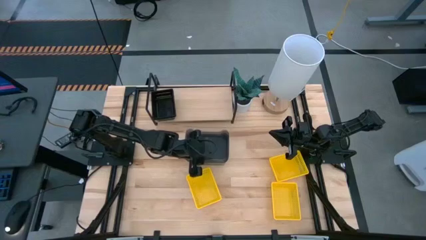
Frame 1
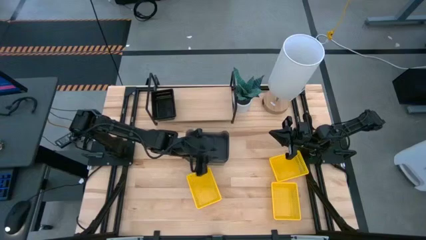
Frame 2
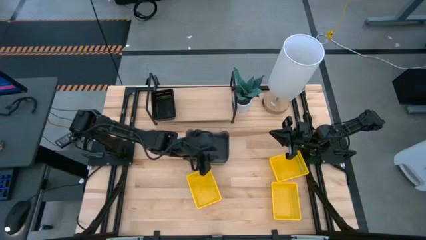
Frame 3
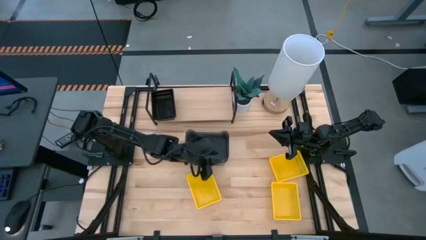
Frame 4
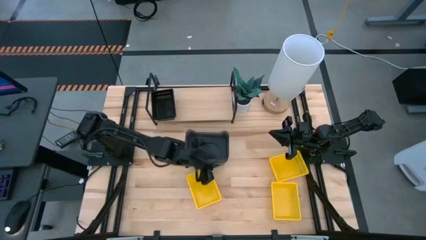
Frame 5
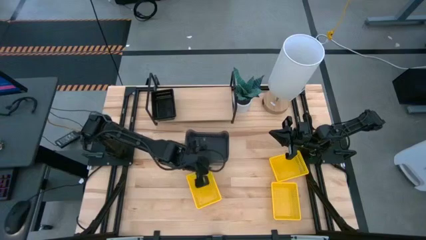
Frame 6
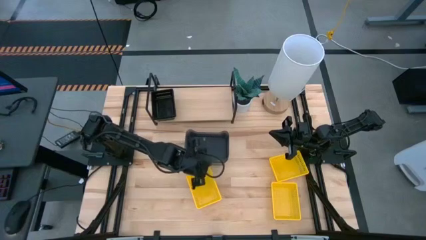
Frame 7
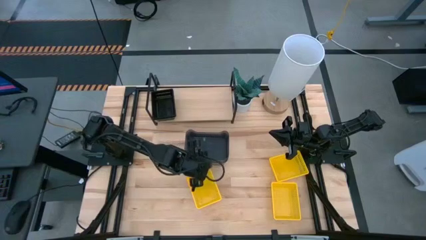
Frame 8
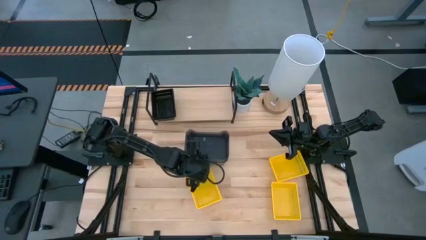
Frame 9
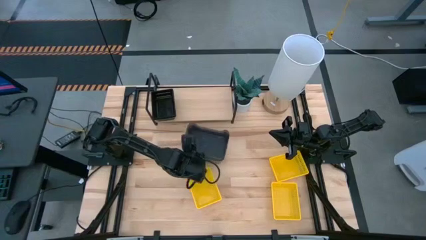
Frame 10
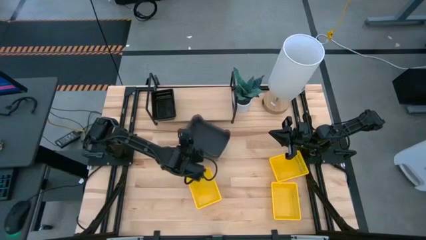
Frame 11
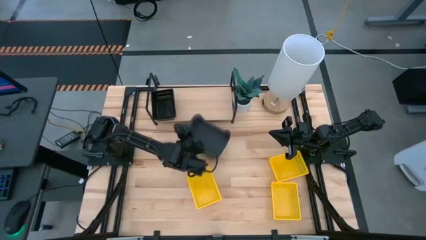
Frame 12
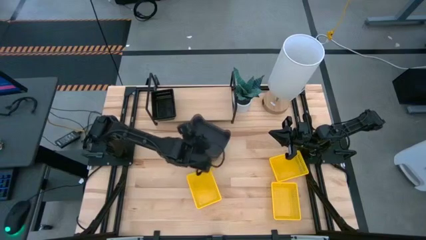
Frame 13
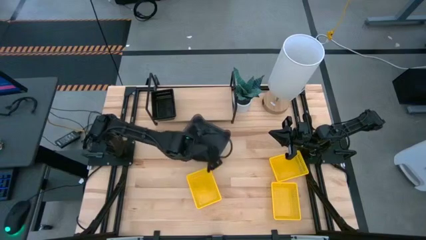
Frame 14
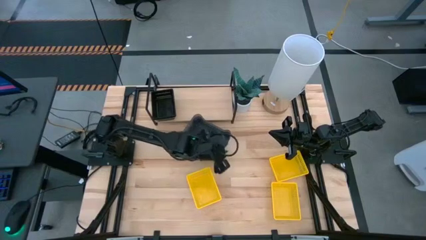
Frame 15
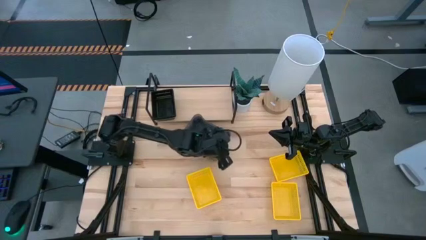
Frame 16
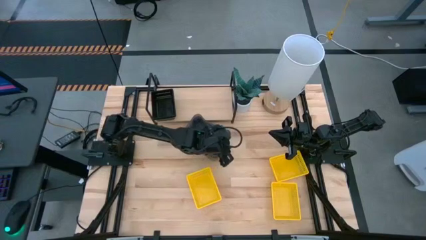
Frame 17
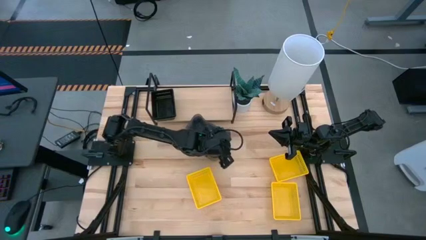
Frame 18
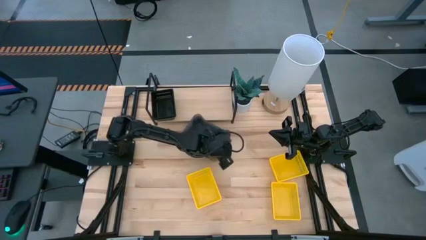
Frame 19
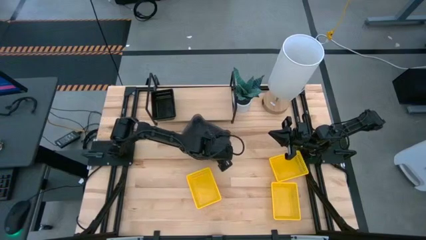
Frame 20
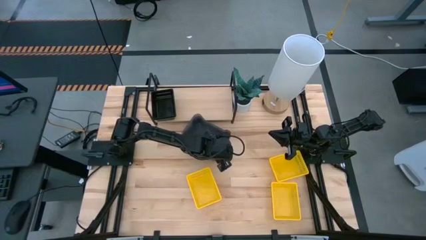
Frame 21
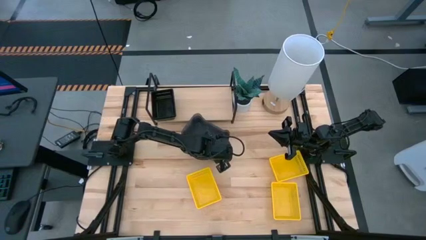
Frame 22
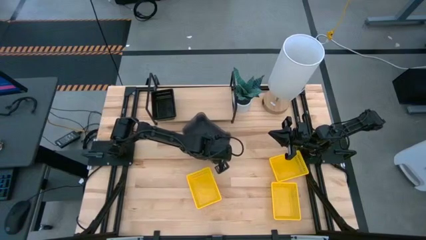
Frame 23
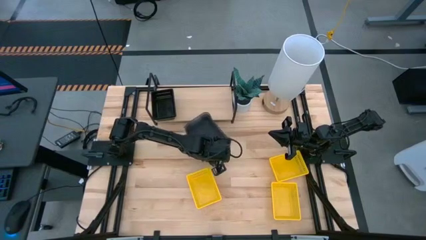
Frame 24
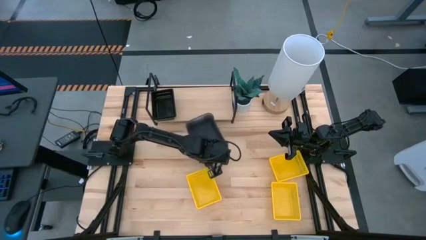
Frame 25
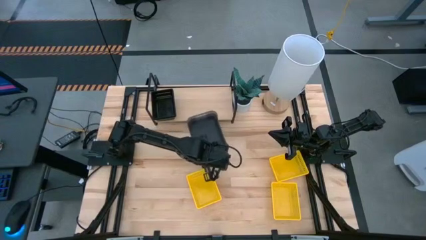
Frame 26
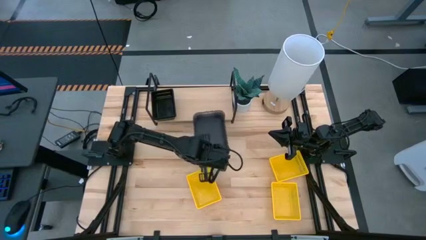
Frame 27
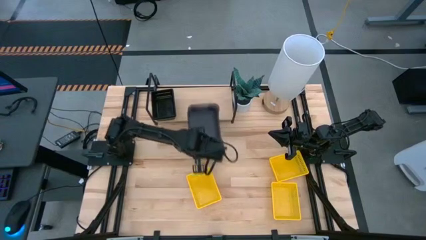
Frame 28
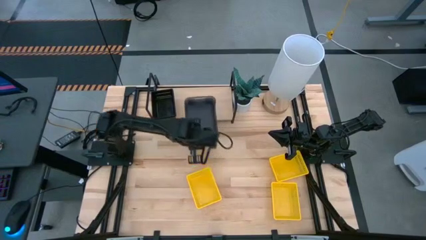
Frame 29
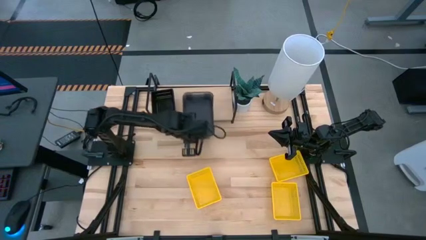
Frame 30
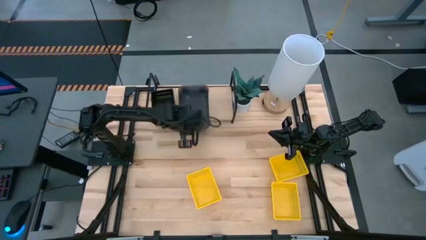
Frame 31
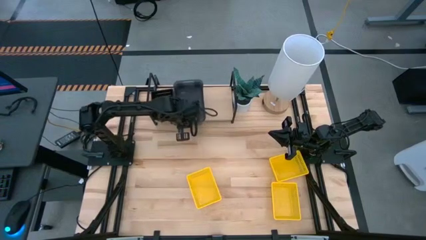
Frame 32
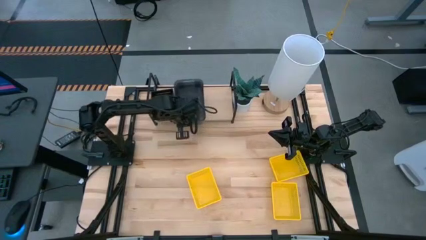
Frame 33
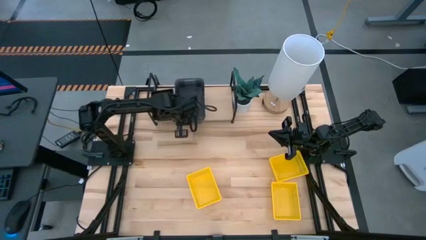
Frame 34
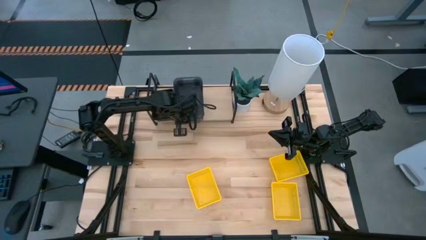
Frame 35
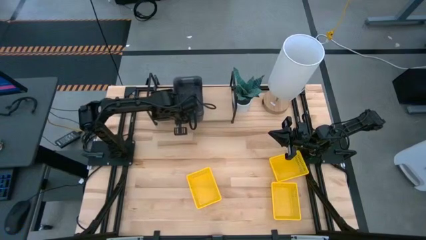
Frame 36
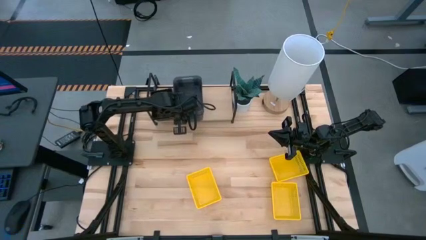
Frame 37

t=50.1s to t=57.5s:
Task: Stack baskets on shelf by color
Put the stacked gray bins on the shelf

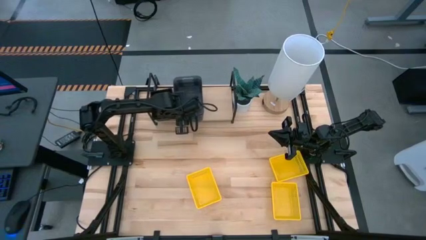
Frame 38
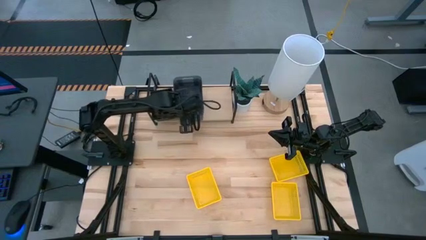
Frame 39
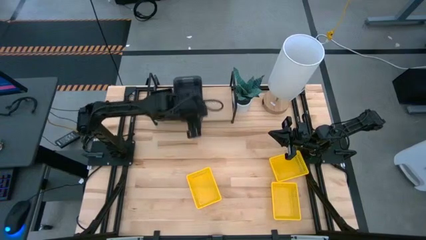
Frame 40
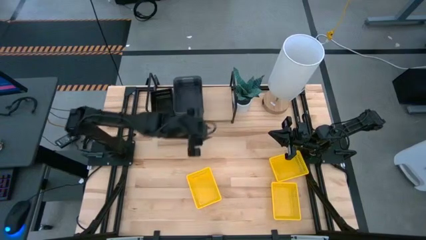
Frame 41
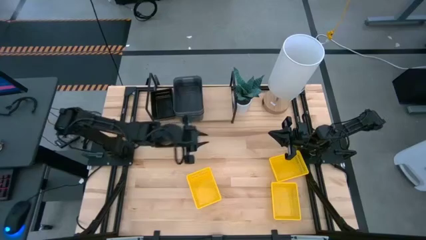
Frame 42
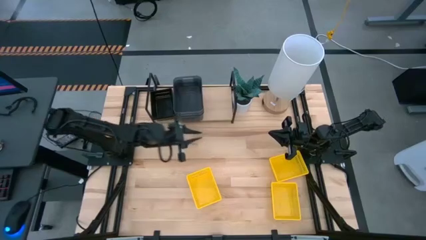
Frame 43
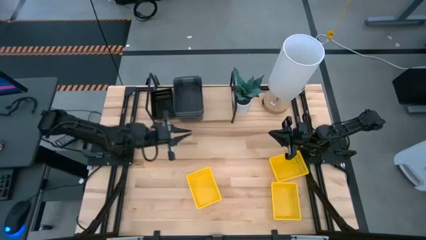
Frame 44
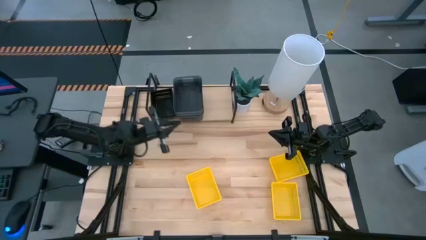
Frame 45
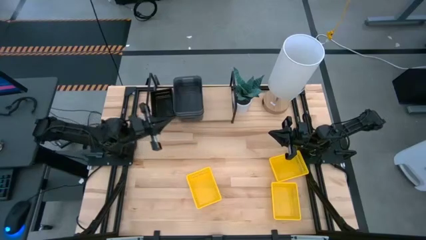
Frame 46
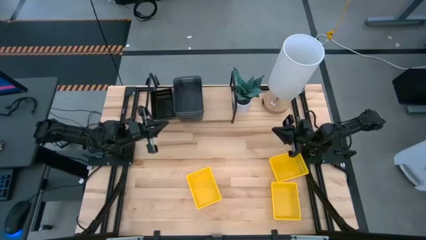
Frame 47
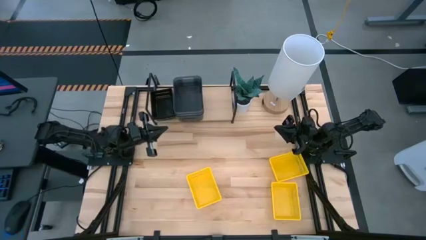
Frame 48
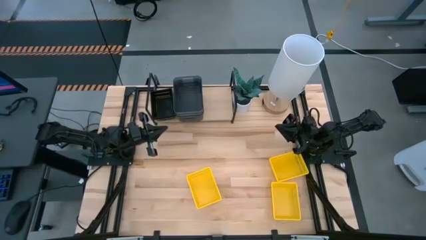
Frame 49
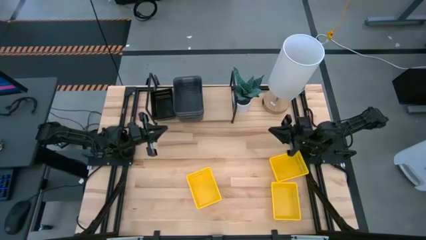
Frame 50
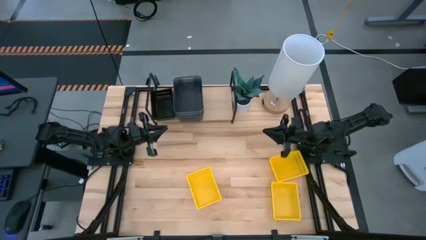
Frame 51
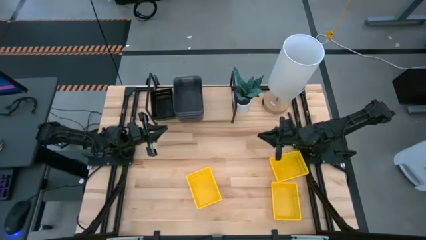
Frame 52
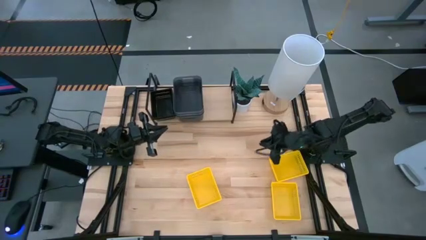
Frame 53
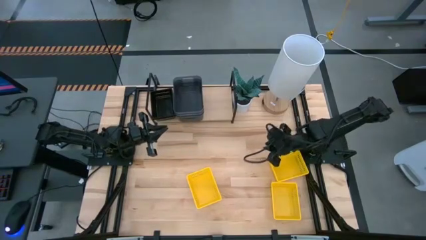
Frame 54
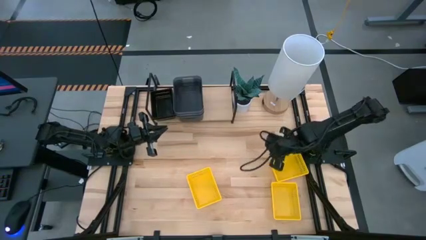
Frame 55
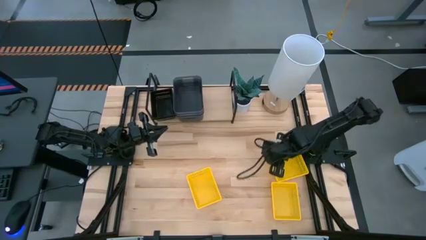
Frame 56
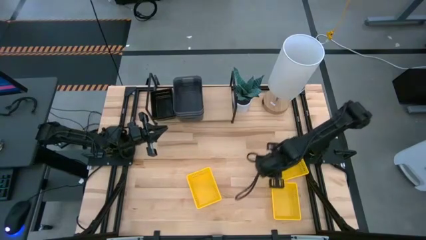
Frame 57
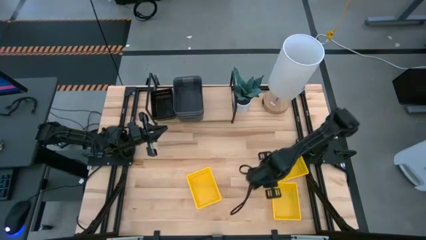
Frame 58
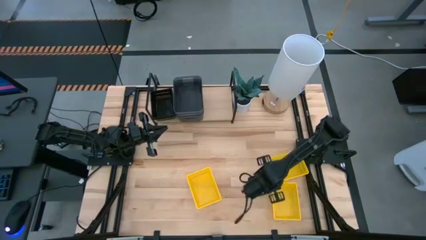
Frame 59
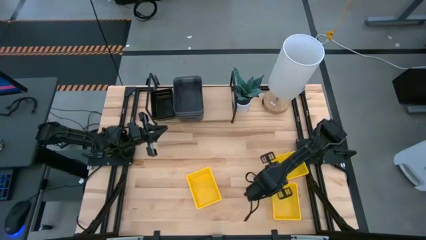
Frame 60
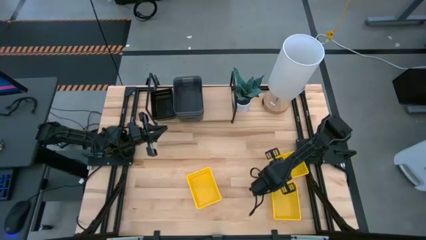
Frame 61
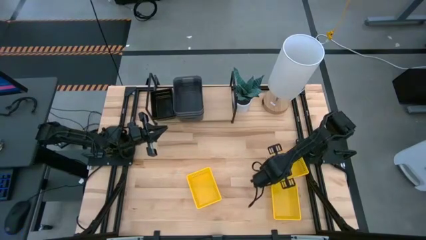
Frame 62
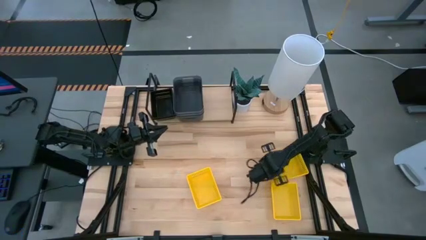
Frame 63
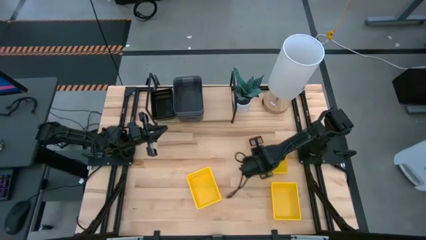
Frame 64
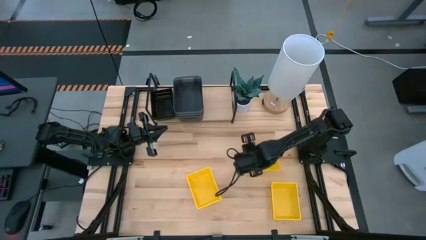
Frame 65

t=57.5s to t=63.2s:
Adjust the yellow bin on the table

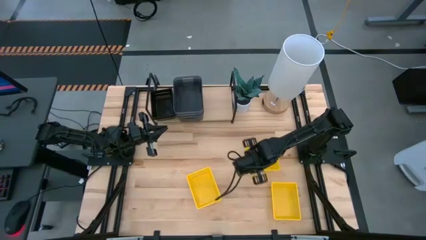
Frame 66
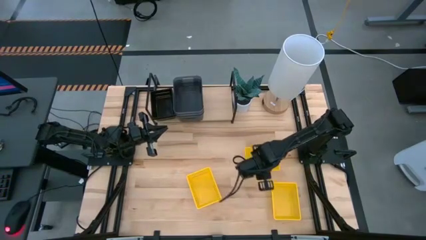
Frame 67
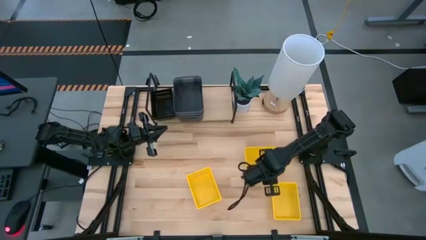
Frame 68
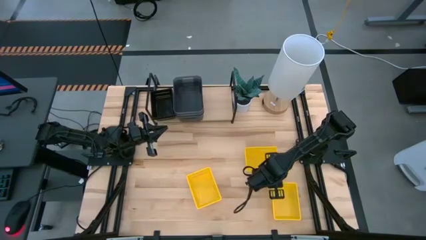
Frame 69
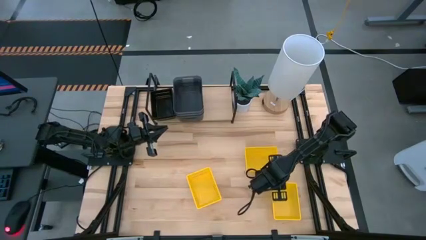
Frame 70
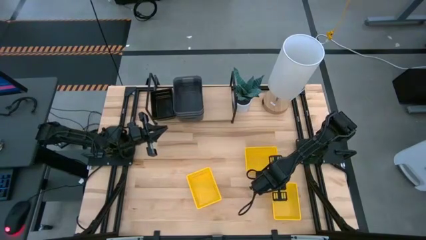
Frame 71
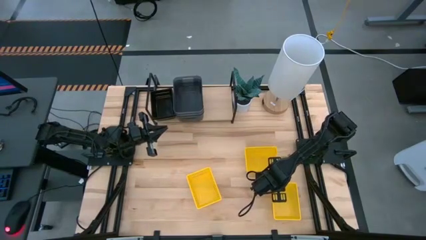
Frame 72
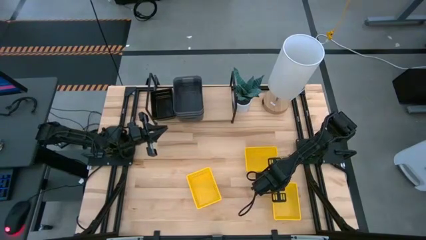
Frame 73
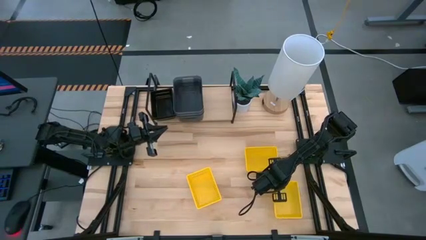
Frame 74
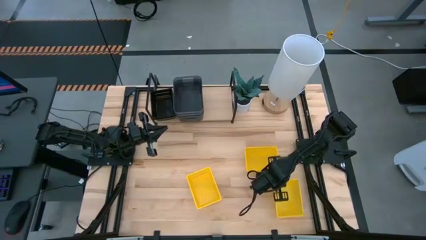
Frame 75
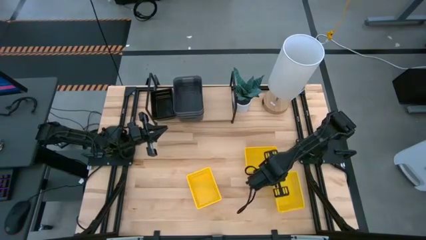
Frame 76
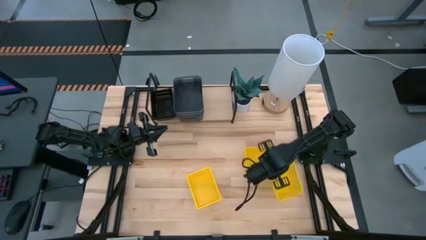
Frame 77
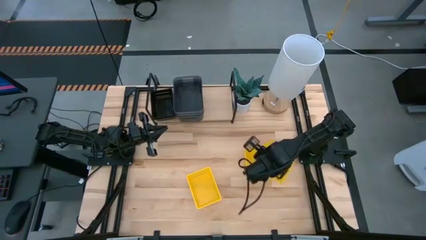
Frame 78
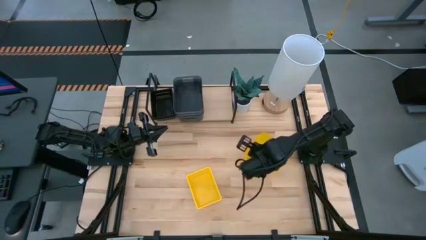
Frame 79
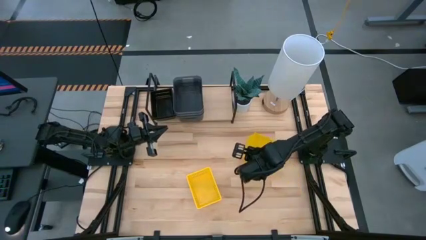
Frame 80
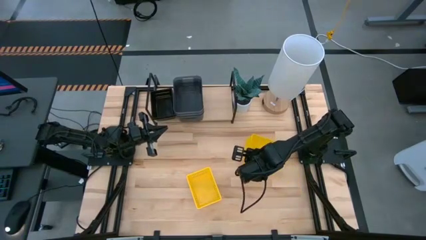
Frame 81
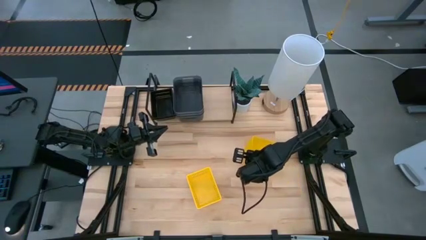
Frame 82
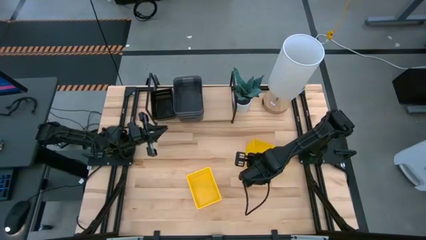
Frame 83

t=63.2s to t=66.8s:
Stack the bottom right yellow bin on the top yellow bin
